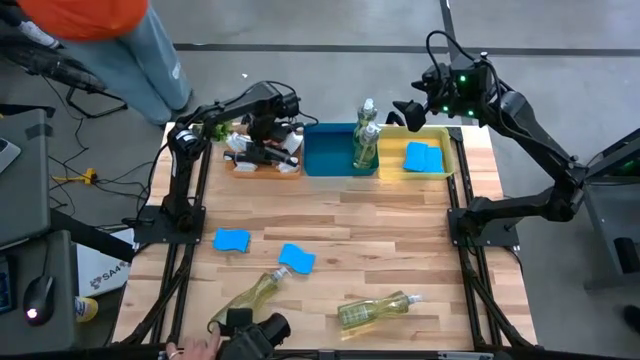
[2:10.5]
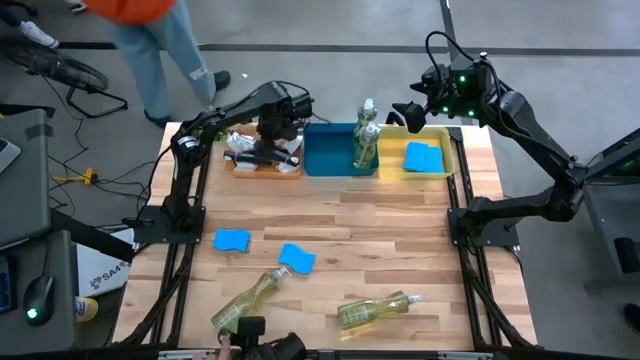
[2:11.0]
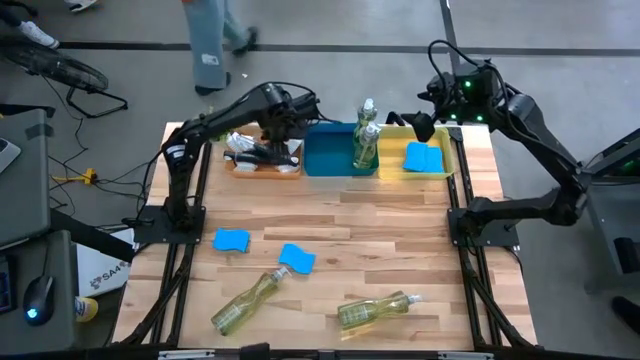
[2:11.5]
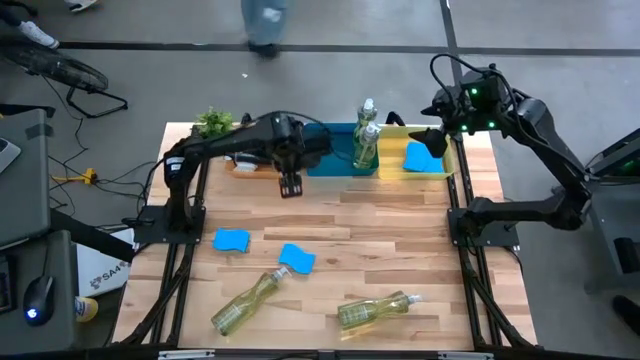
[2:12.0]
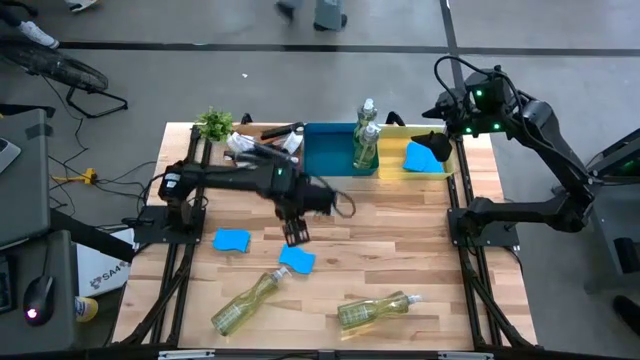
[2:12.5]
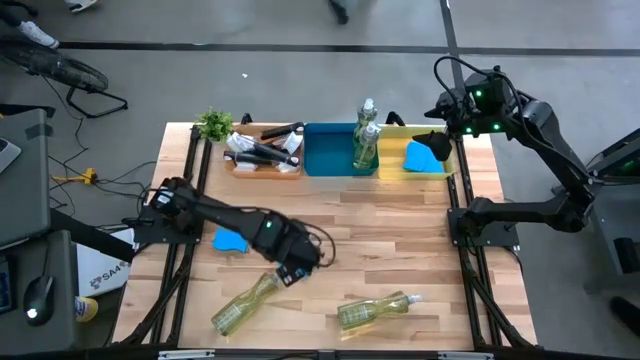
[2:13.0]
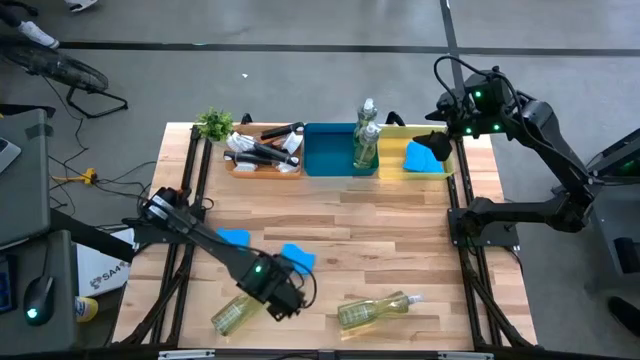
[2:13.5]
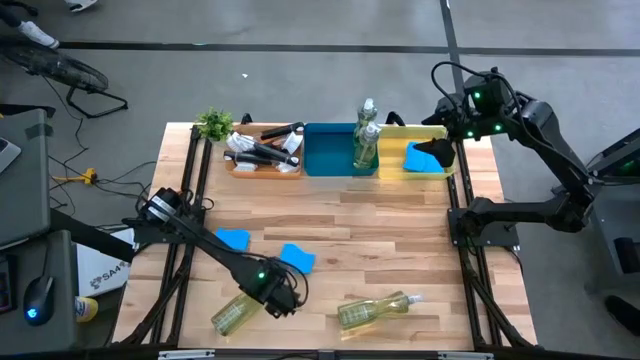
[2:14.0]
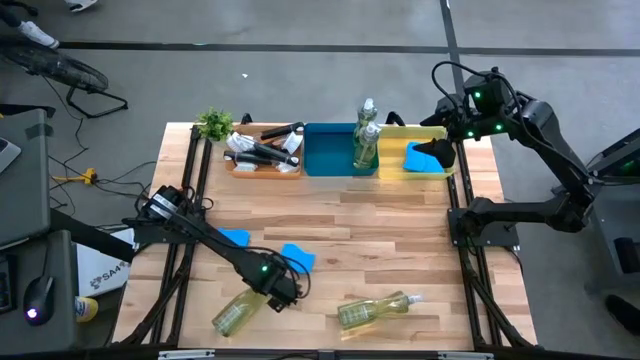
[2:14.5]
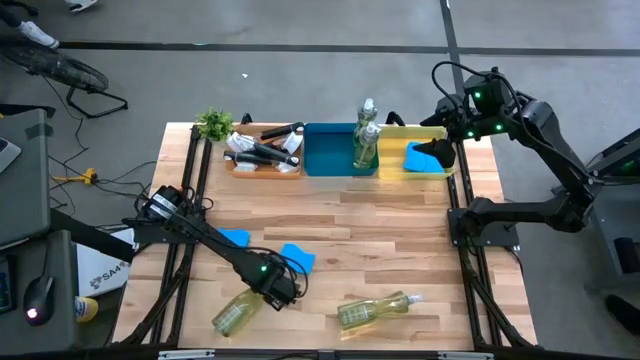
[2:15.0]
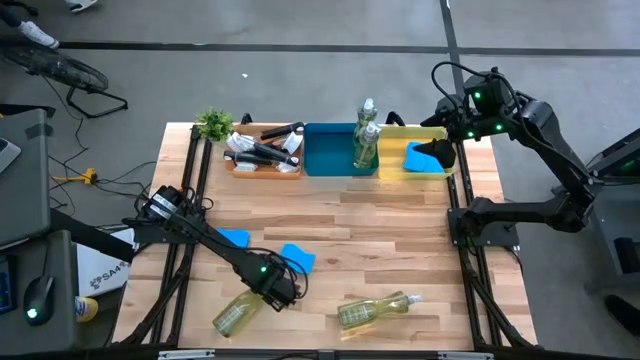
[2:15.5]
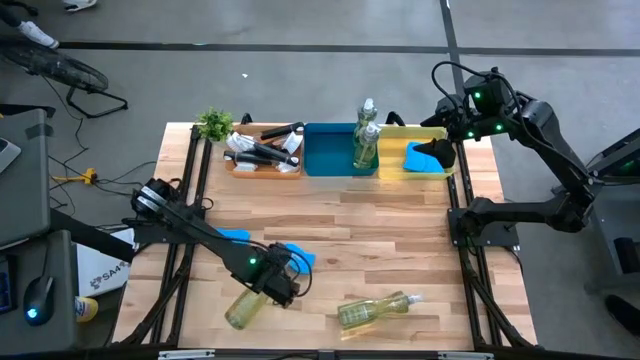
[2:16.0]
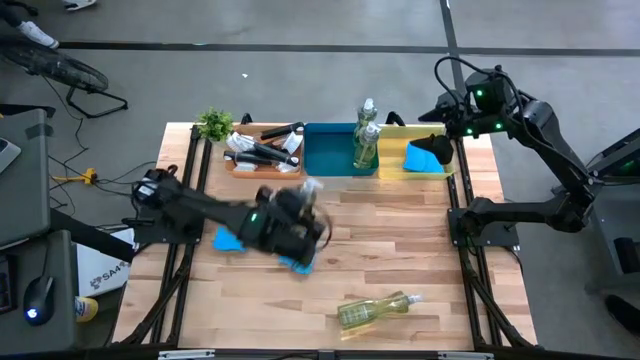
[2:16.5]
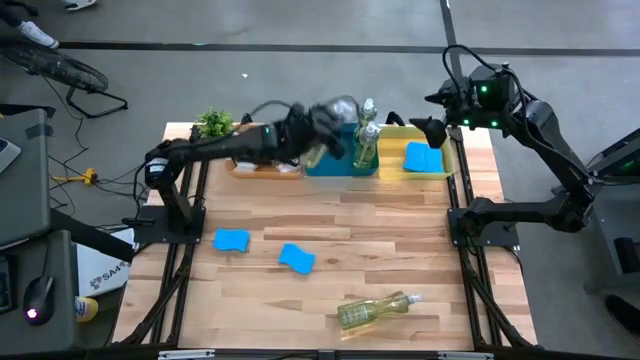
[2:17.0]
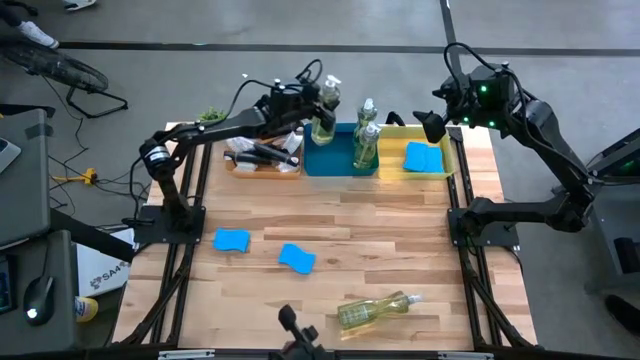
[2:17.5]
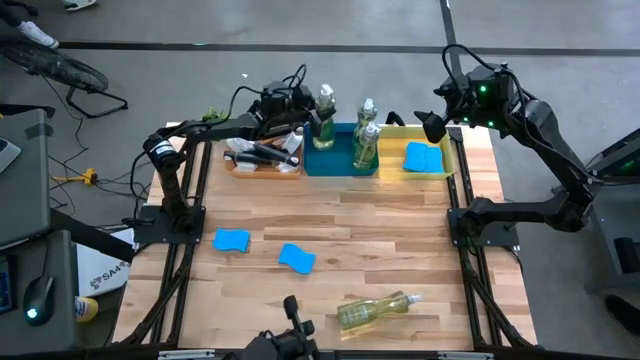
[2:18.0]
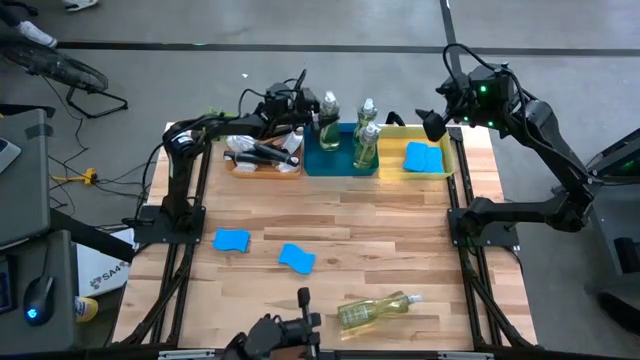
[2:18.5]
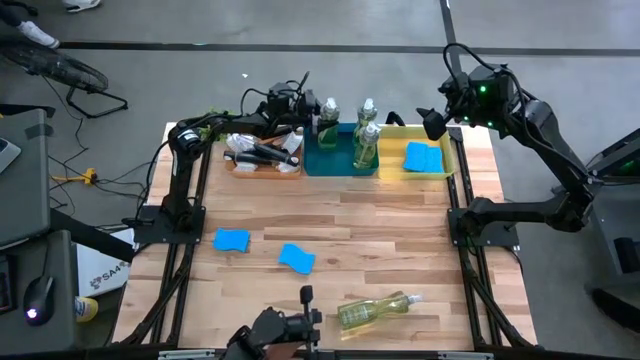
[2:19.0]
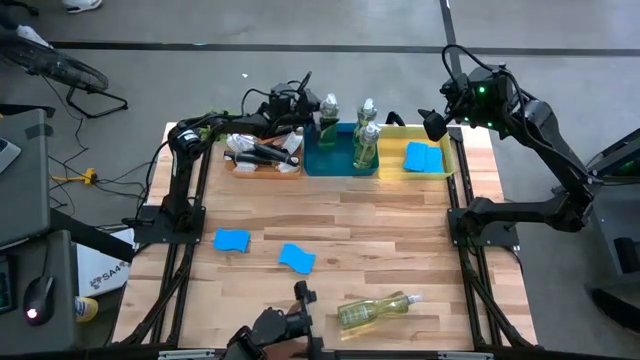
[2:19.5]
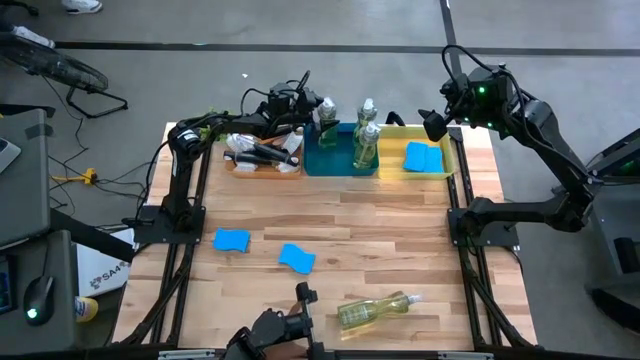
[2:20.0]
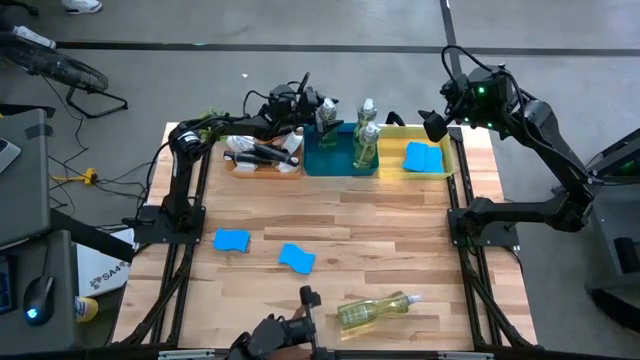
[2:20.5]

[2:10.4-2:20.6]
Task: Pick & Place Kitchen Sink Supplies
Put the green dishwashing liquid bottle into the blue bin

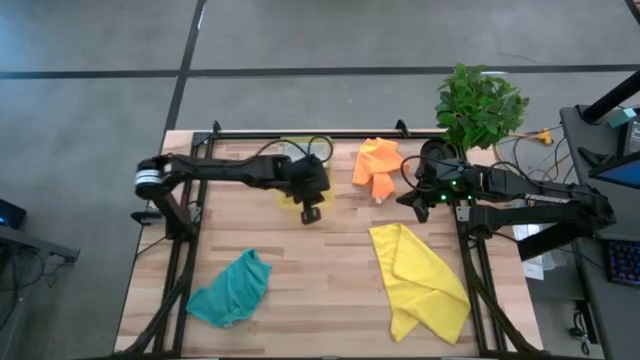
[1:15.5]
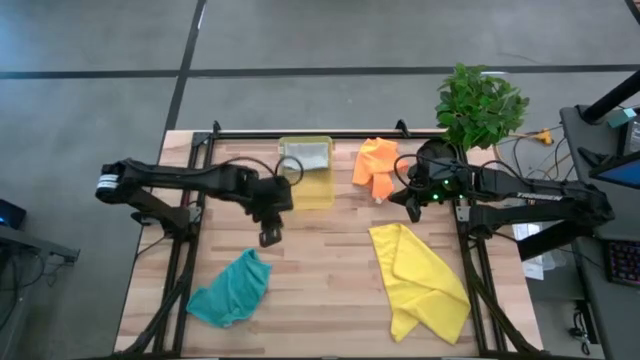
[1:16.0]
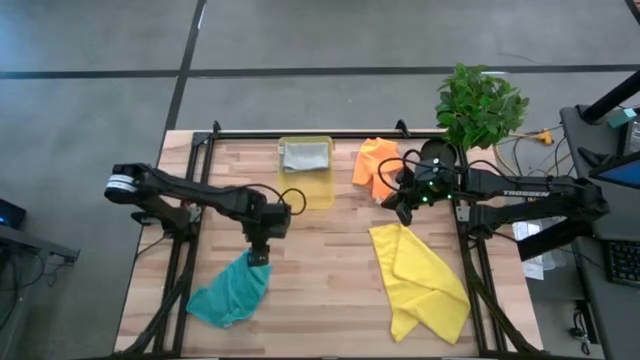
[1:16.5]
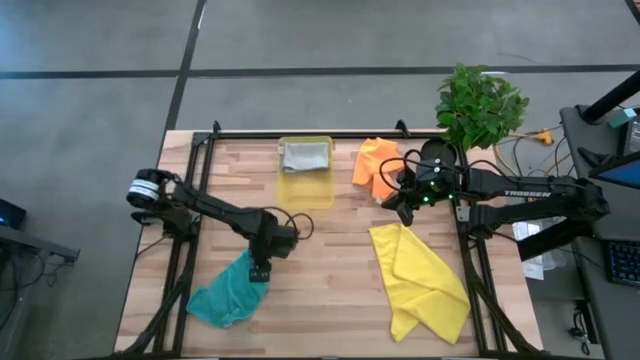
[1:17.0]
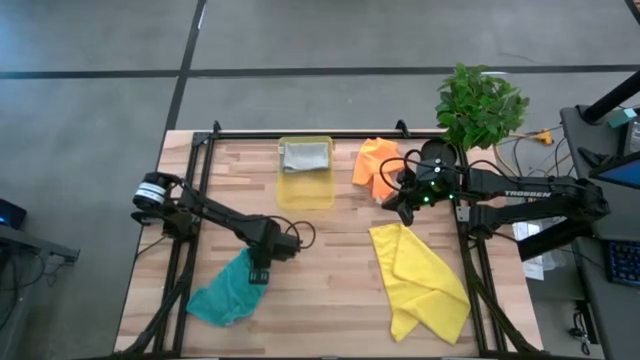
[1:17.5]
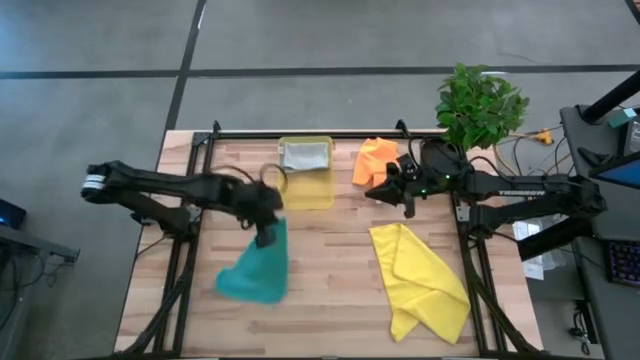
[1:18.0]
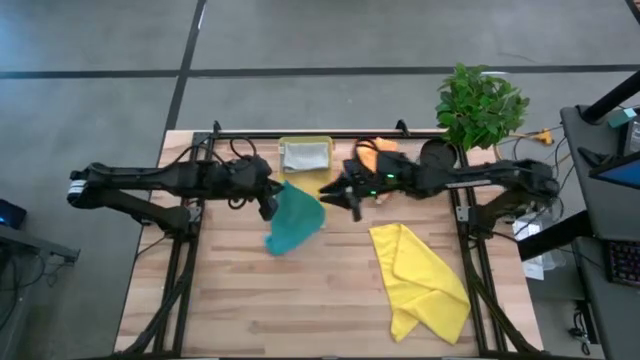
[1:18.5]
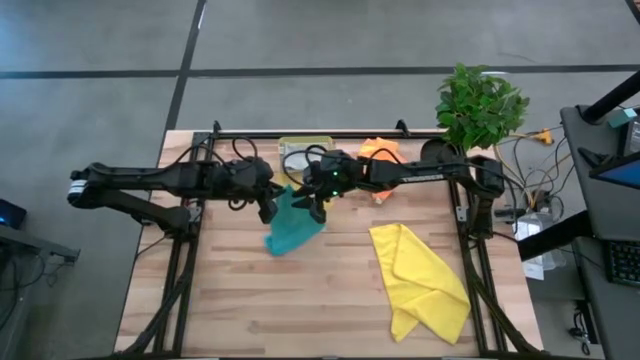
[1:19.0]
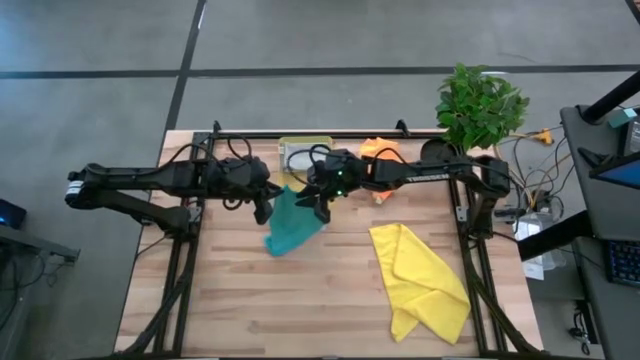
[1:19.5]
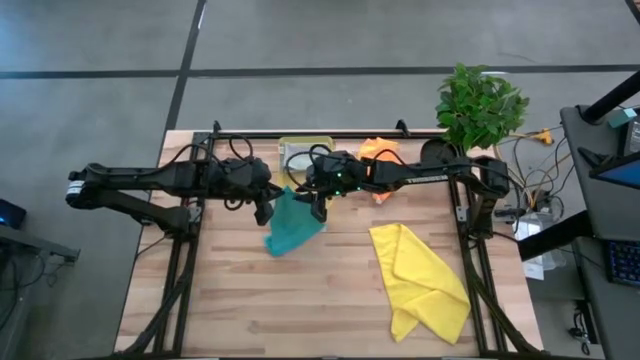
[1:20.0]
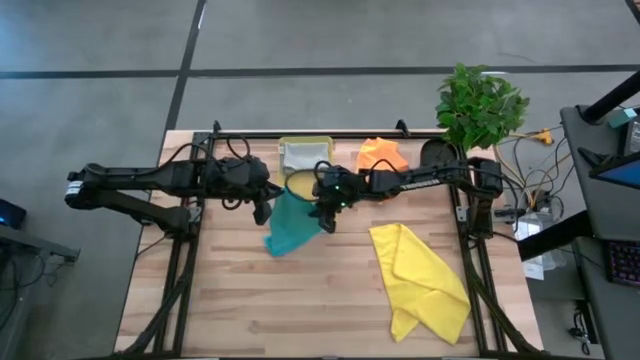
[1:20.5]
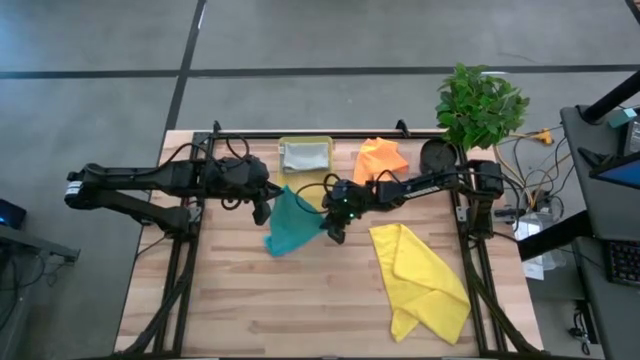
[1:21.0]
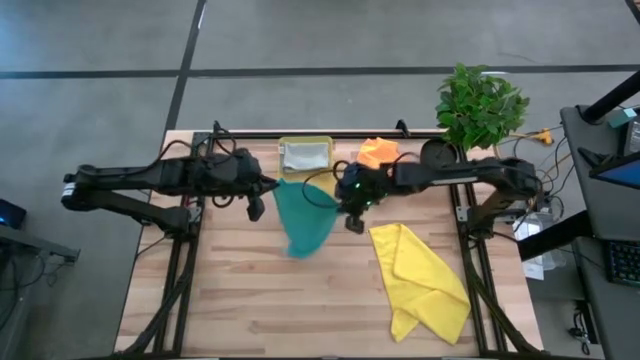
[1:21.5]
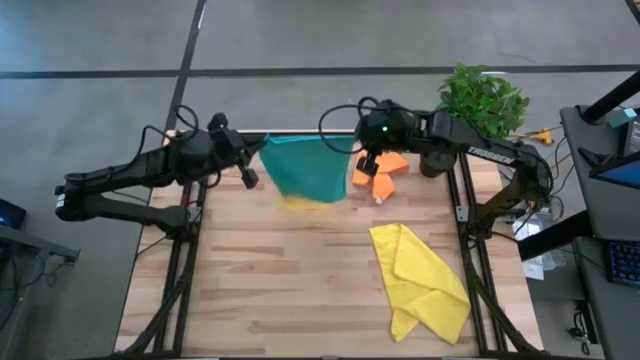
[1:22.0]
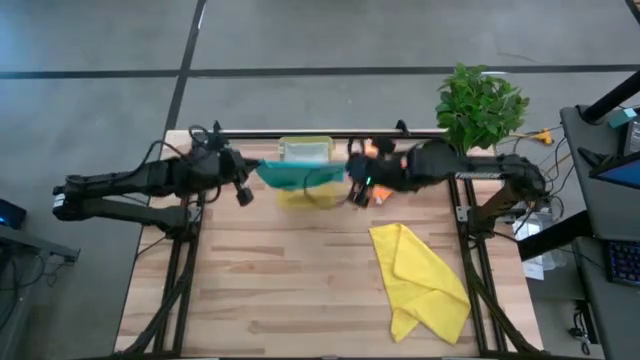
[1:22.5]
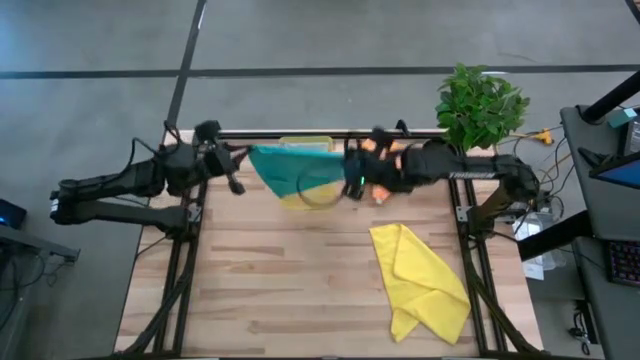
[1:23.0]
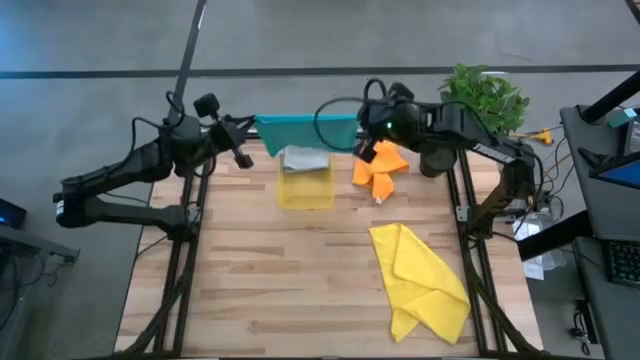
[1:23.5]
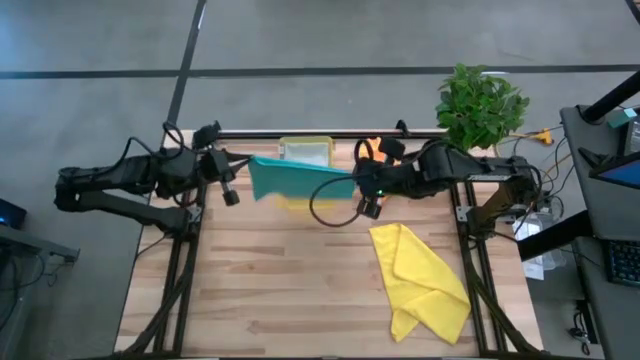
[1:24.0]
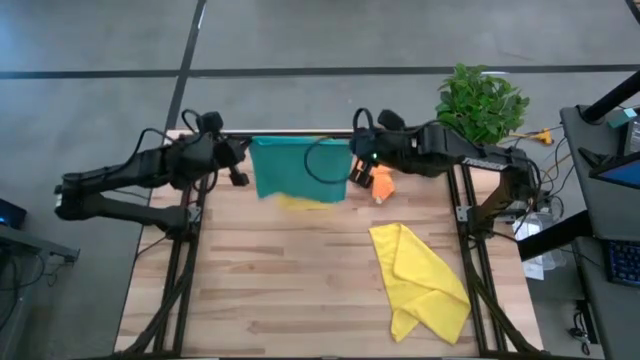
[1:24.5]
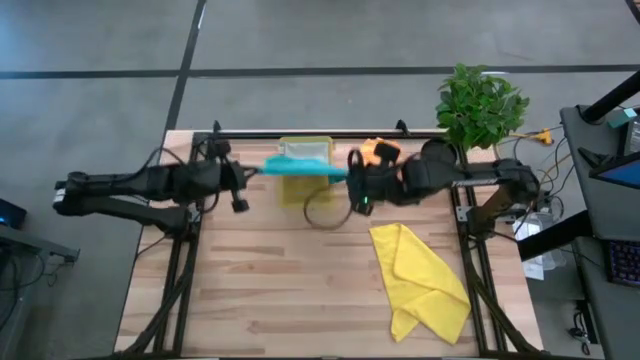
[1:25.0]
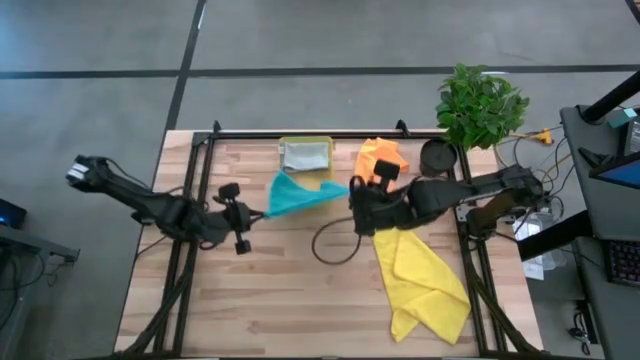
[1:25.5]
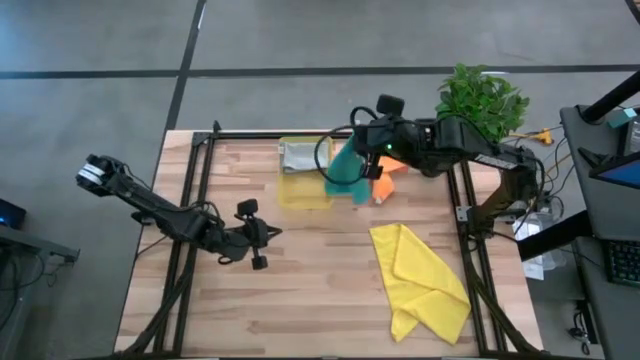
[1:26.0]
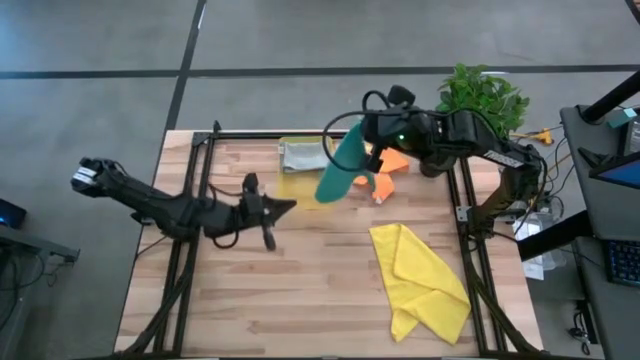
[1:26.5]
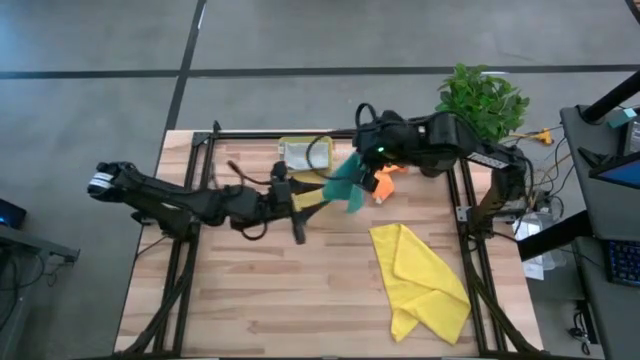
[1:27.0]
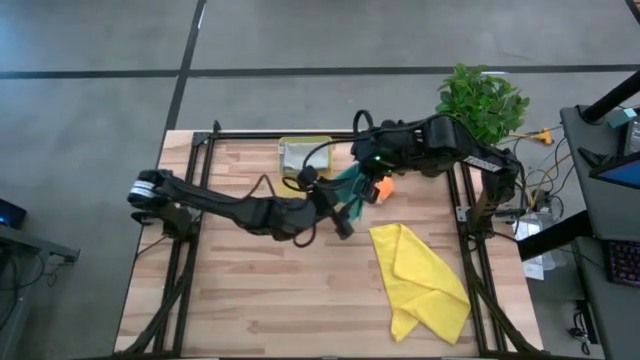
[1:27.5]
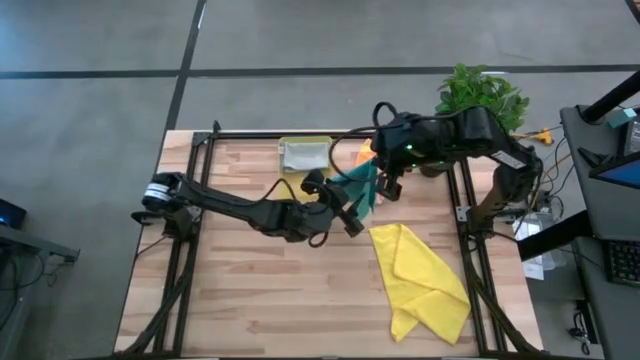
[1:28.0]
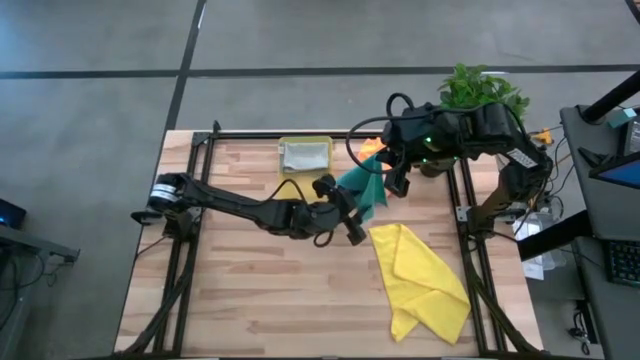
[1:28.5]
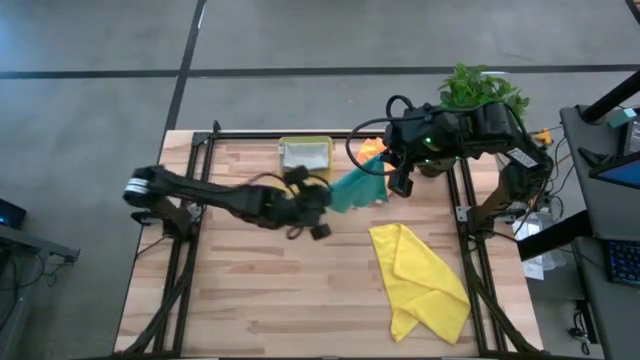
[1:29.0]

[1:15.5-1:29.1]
Task: Fold microfiber towels
Fold the light blue microfiber cloth
